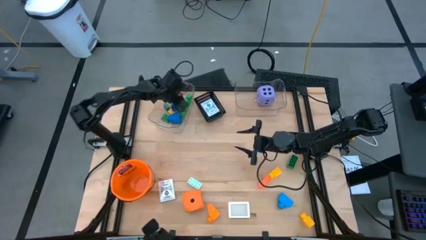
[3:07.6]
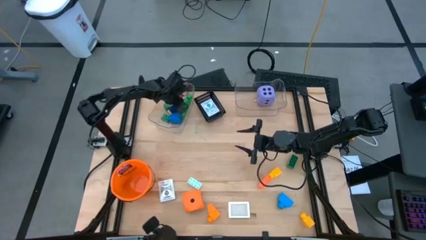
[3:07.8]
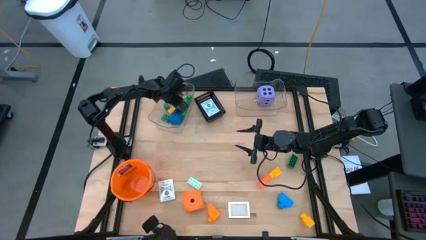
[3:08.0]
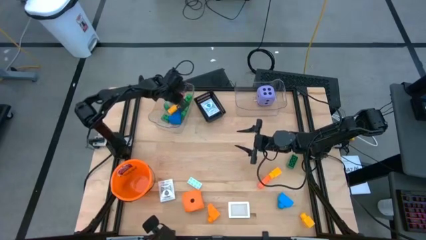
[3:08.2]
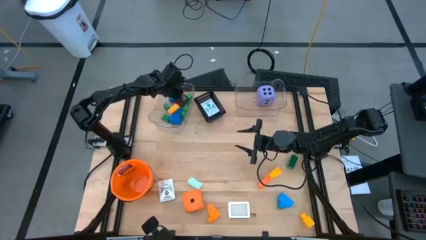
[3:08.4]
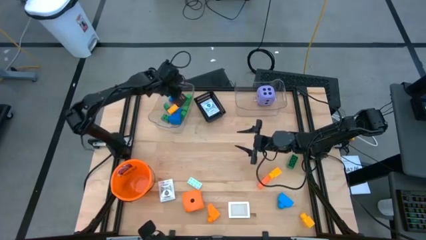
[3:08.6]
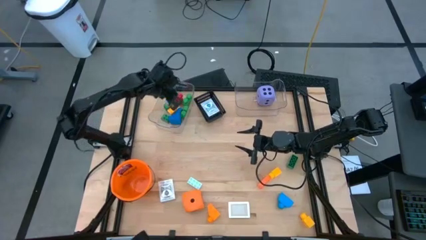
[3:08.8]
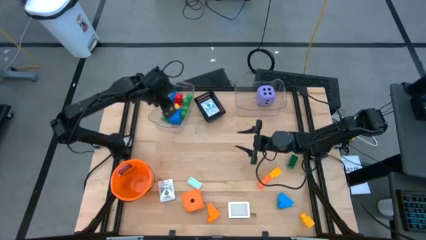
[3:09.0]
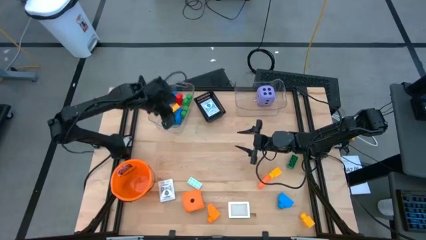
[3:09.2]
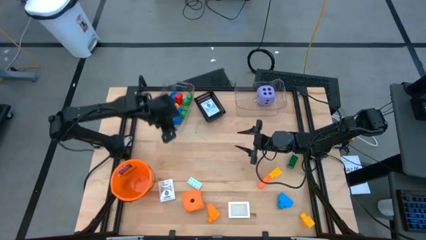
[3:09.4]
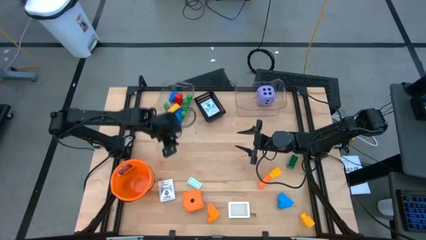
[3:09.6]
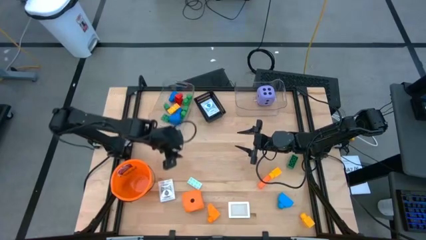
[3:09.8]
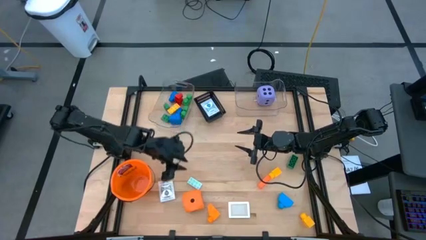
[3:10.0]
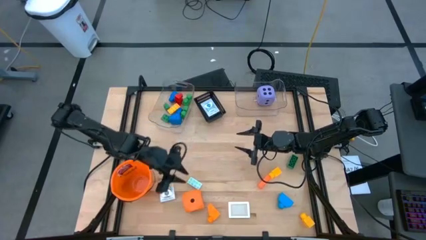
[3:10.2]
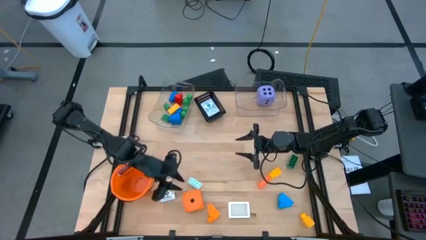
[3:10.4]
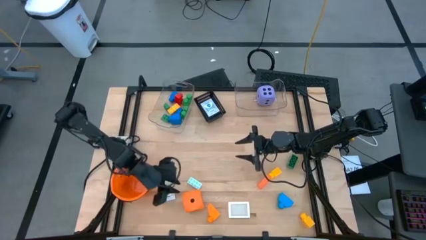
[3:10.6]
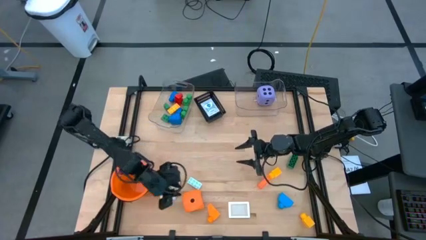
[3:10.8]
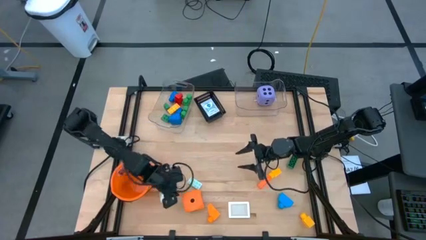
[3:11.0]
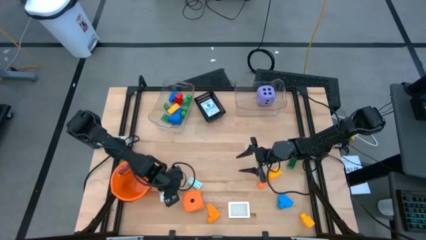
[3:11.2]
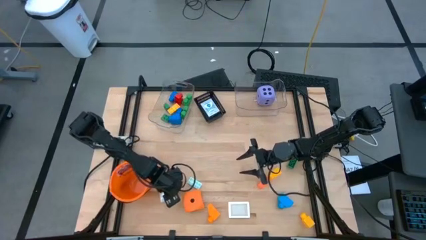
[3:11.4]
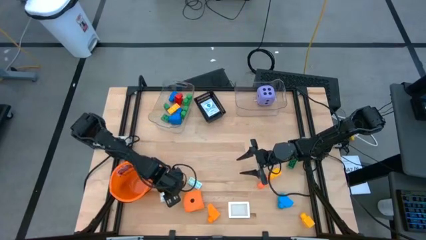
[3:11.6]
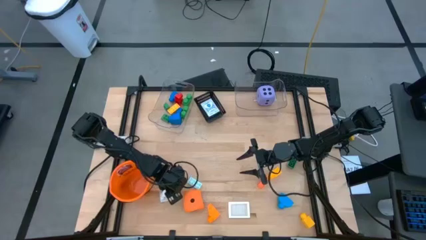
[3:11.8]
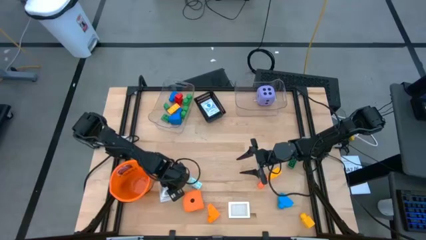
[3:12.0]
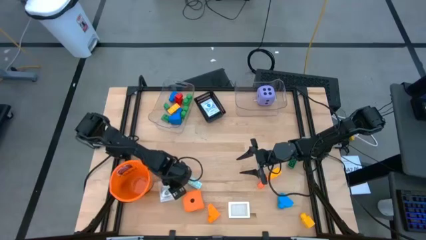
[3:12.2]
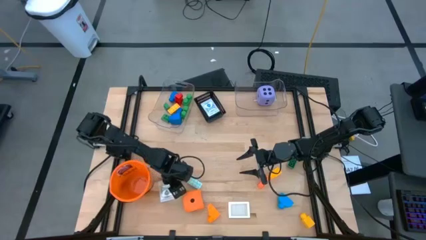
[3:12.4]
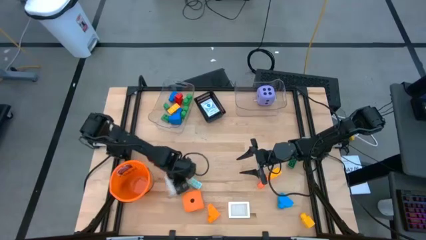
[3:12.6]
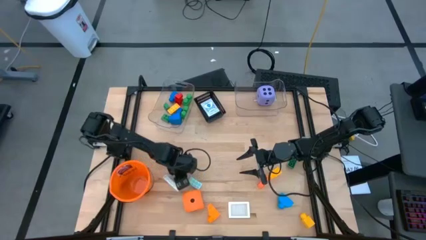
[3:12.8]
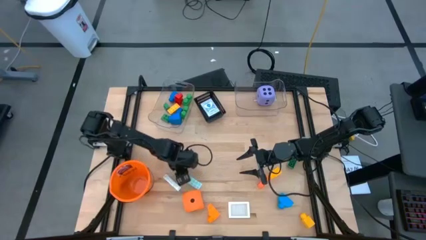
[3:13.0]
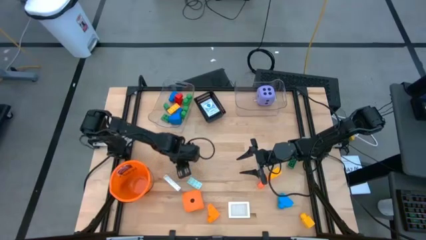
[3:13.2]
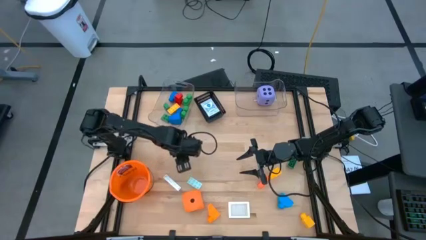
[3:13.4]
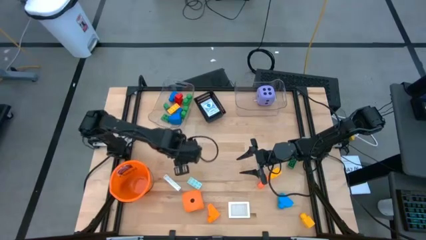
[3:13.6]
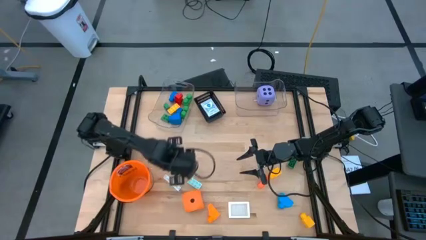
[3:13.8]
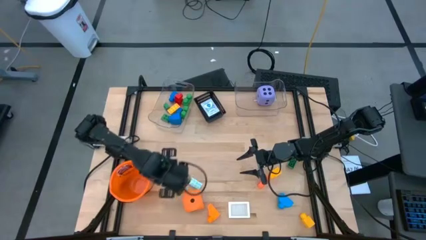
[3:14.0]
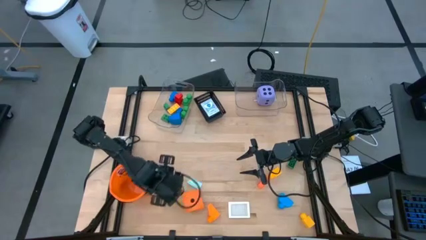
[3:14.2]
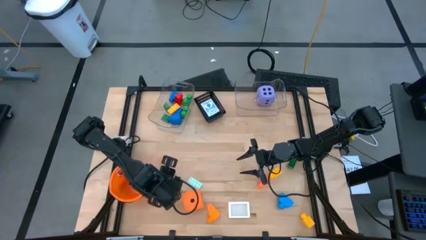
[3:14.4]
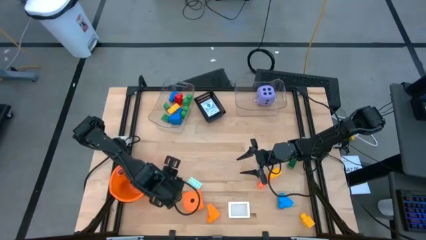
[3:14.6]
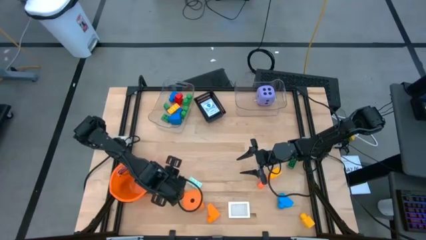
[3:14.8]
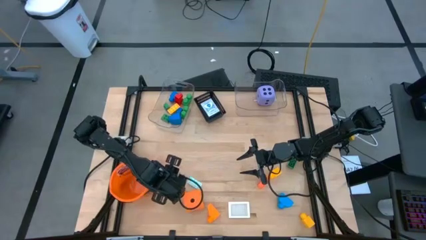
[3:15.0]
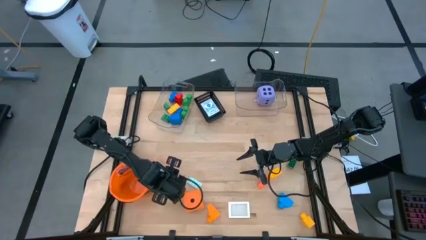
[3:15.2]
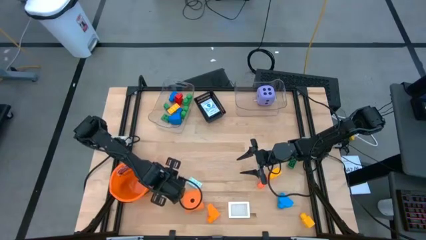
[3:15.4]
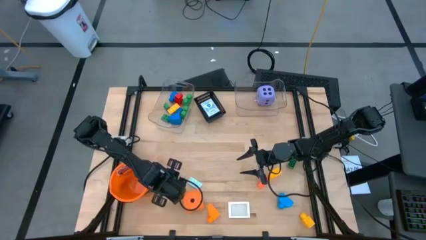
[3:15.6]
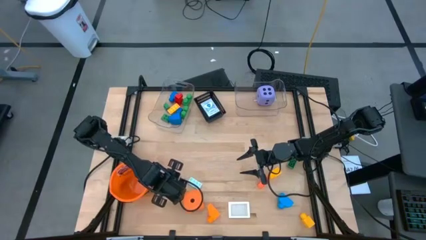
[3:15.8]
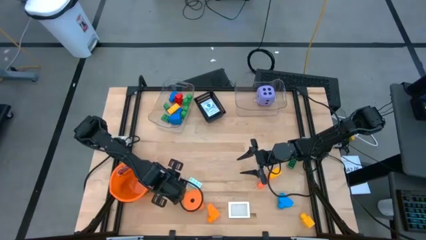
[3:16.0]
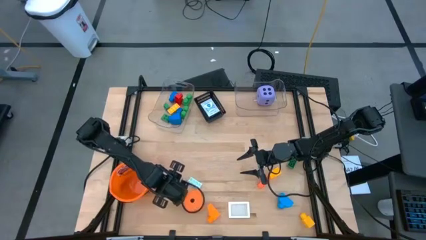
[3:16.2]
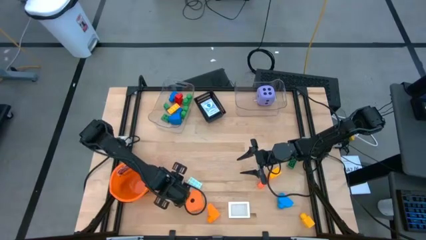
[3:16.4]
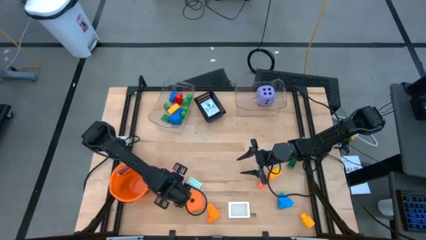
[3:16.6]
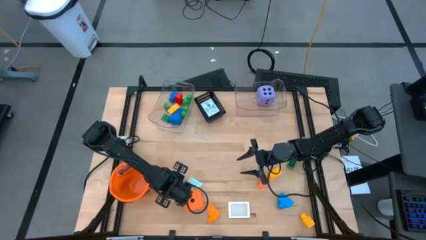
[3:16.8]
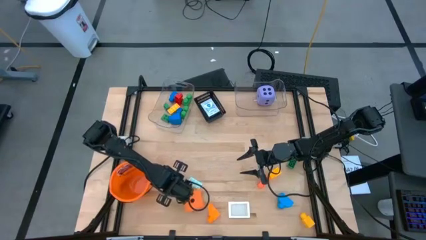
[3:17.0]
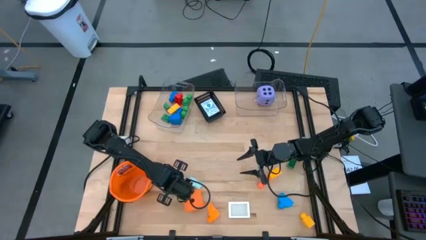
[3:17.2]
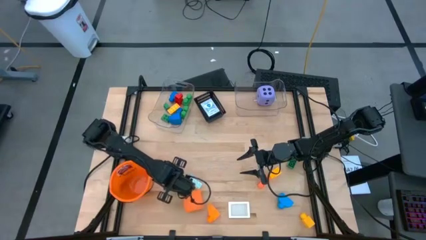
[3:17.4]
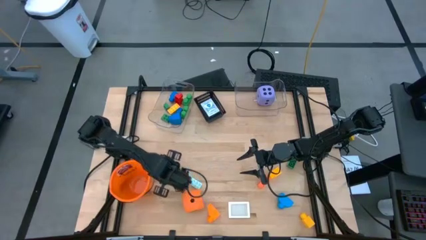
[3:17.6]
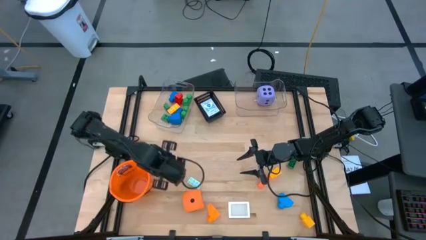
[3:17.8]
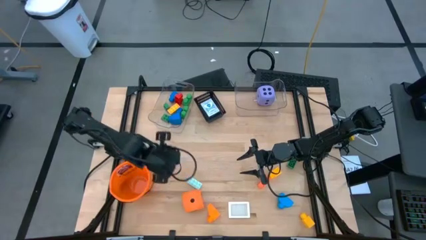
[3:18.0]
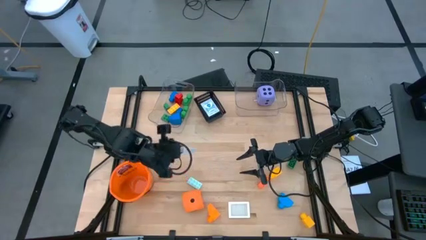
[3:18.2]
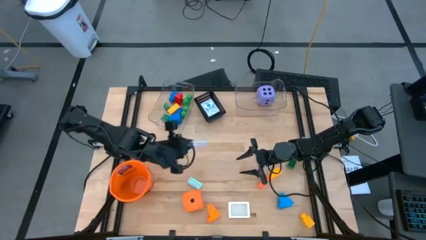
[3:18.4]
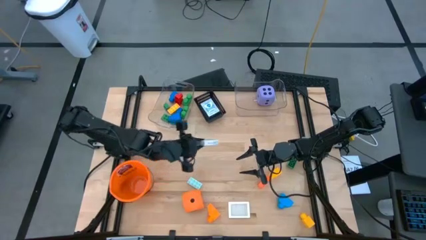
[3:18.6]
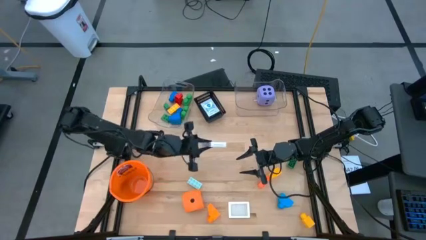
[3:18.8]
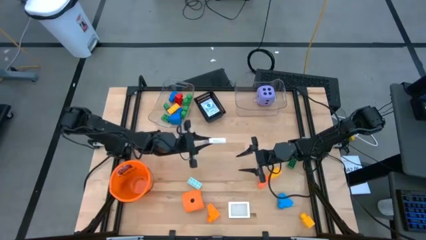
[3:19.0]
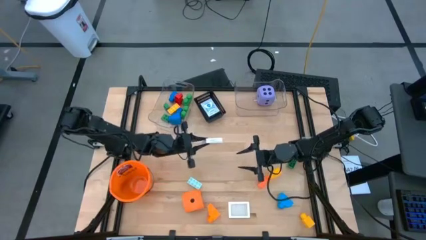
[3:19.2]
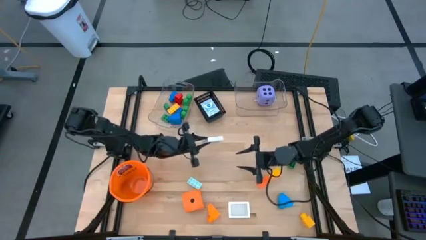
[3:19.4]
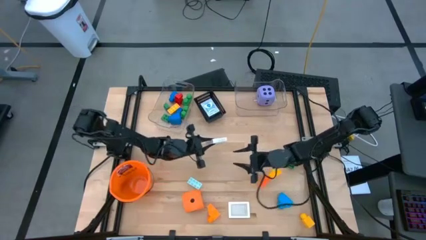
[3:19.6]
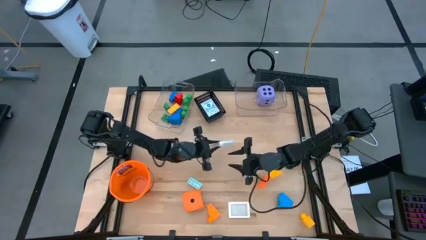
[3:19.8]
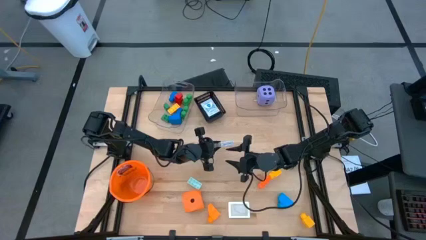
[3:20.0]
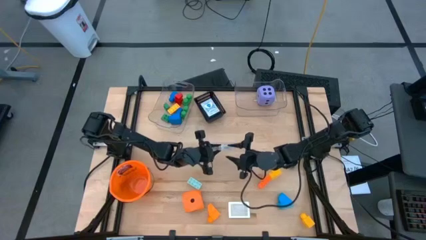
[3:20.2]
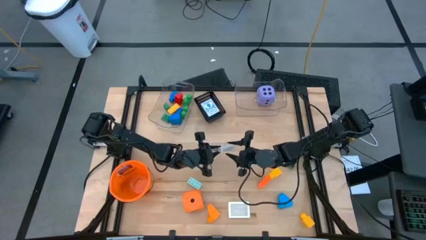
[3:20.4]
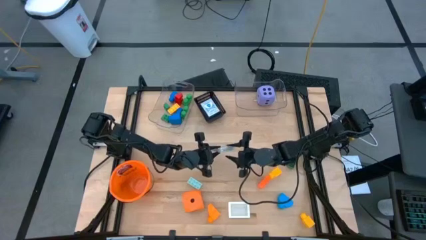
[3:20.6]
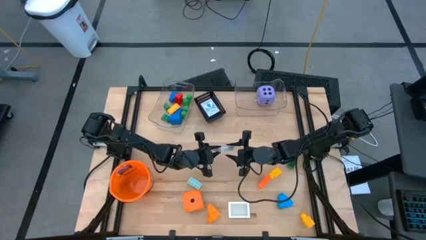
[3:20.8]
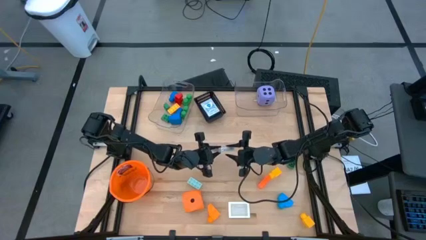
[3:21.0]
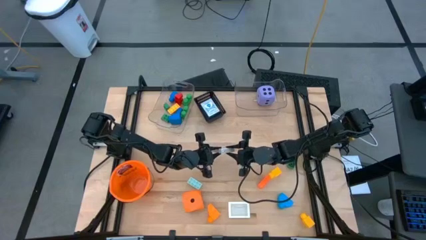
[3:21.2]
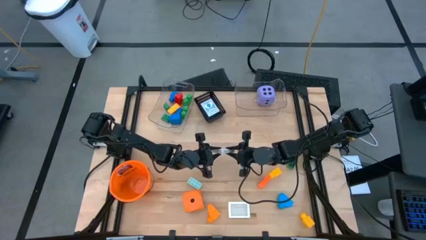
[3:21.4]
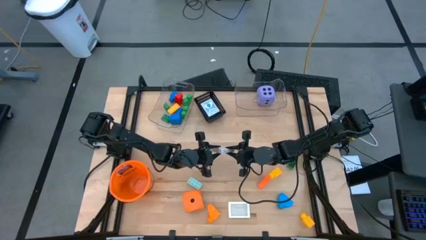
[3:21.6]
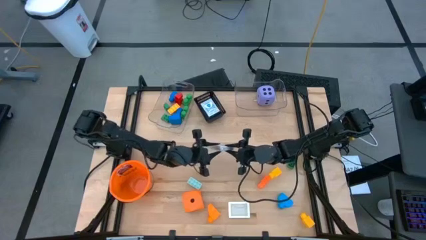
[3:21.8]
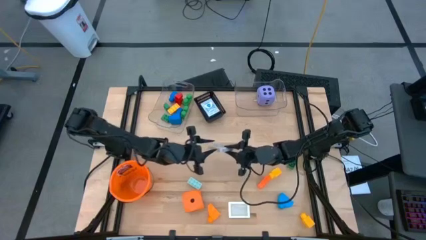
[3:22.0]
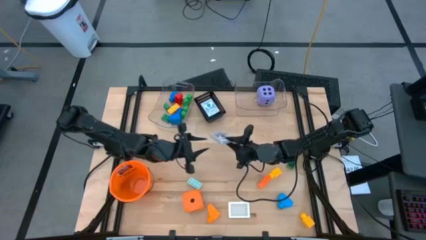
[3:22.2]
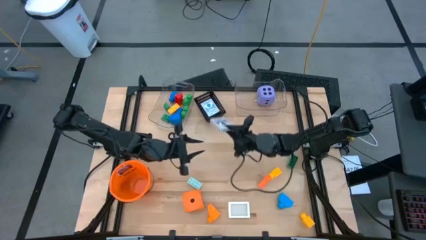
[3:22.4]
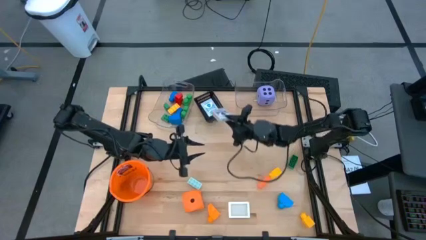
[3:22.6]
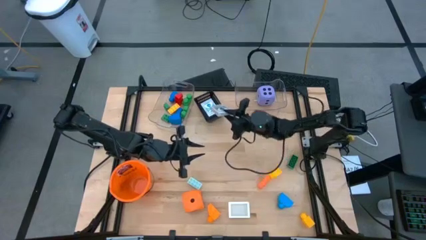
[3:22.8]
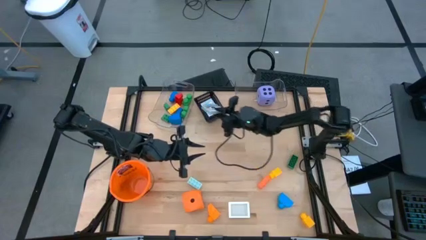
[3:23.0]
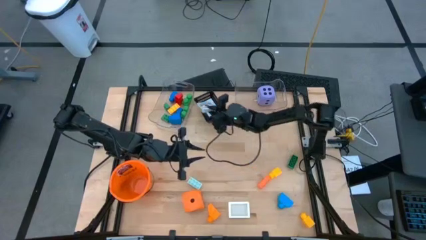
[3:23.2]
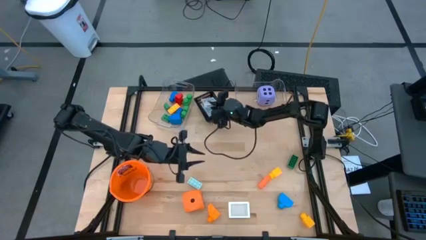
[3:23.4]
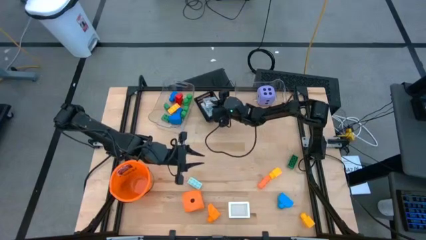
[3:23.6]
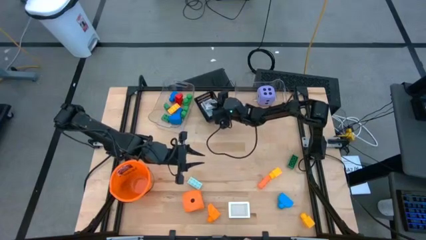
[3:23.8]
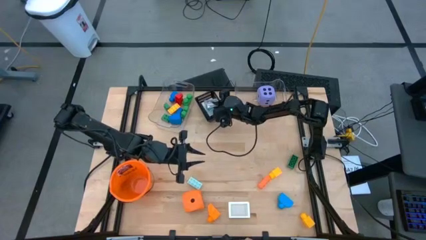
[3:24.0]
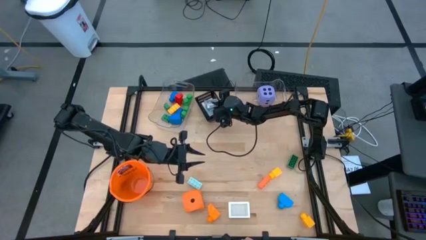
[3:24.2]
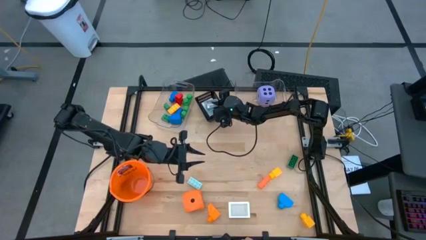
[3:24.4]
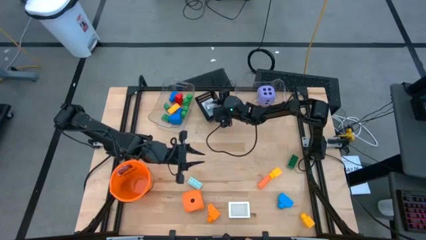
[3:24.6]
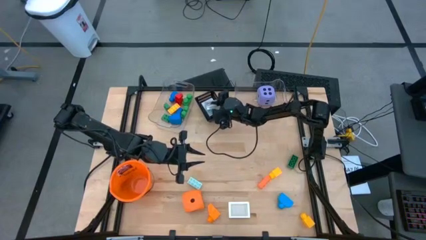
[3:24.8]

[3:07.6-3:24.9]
Task: Pick & Place Toys
Put the black deck of cards into the black basket
